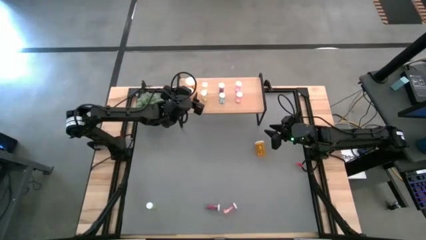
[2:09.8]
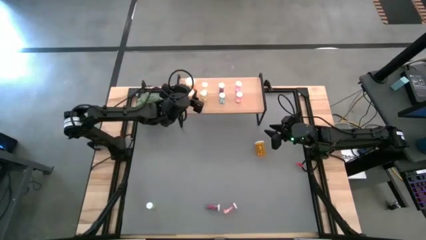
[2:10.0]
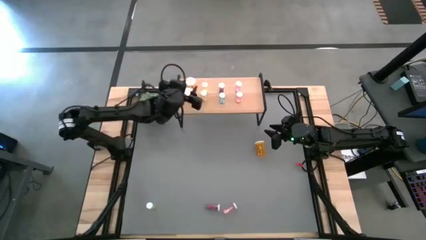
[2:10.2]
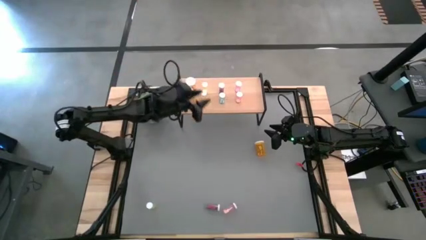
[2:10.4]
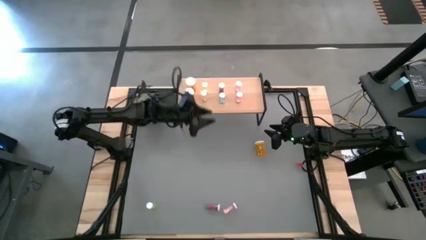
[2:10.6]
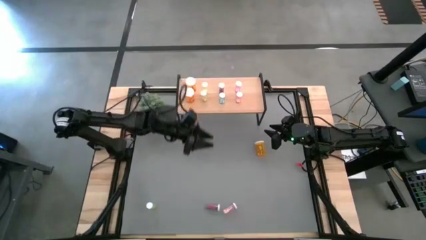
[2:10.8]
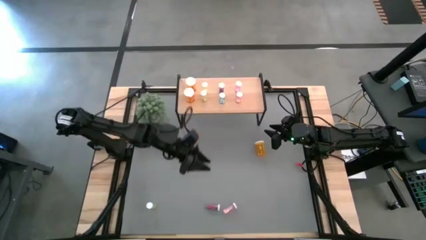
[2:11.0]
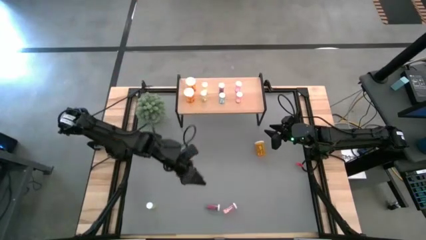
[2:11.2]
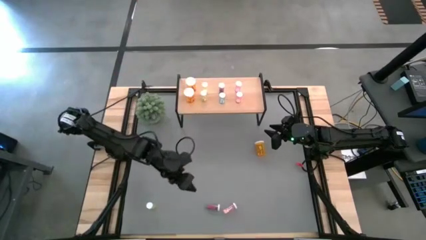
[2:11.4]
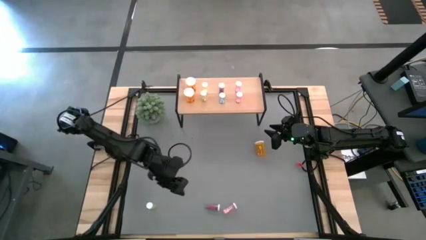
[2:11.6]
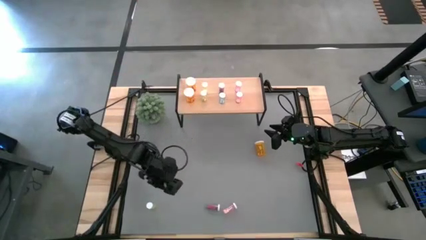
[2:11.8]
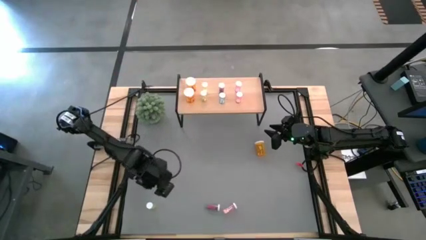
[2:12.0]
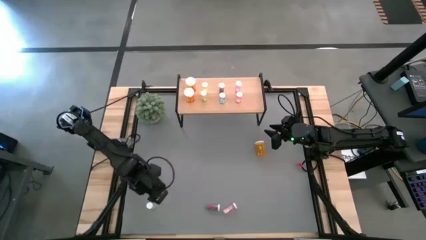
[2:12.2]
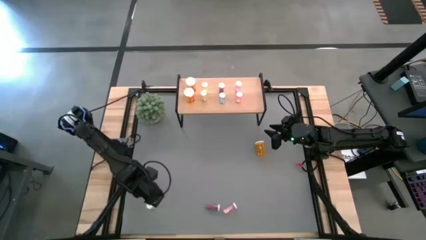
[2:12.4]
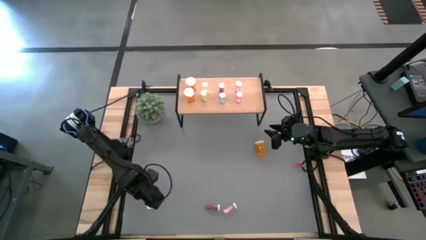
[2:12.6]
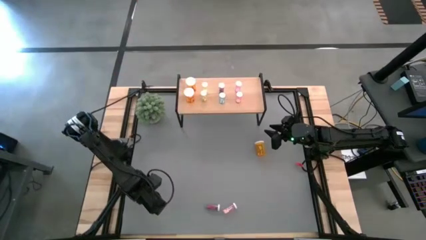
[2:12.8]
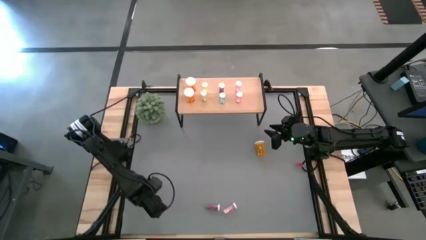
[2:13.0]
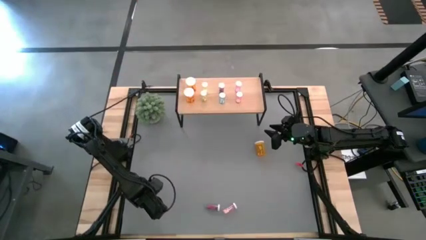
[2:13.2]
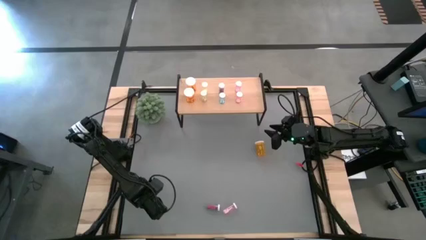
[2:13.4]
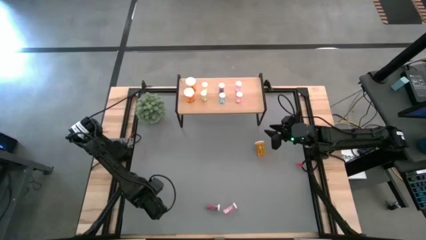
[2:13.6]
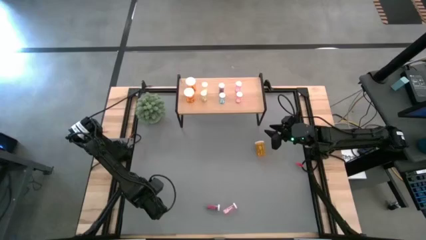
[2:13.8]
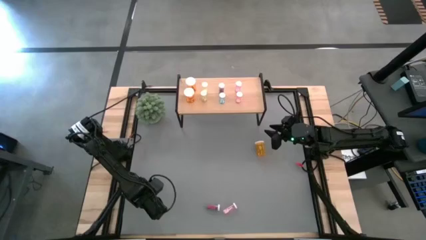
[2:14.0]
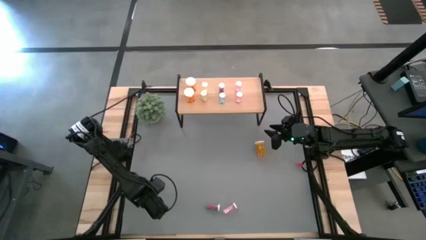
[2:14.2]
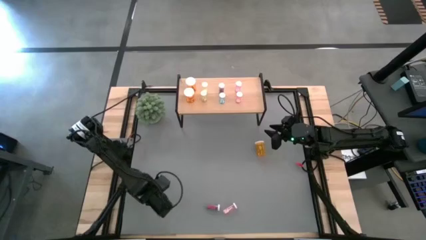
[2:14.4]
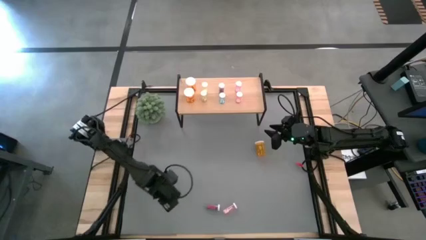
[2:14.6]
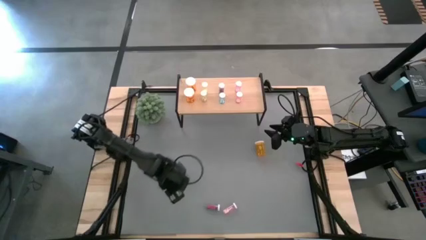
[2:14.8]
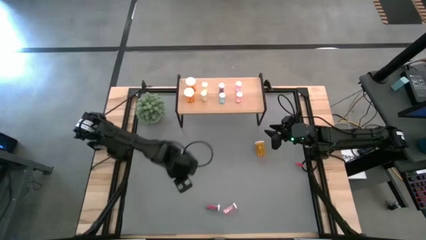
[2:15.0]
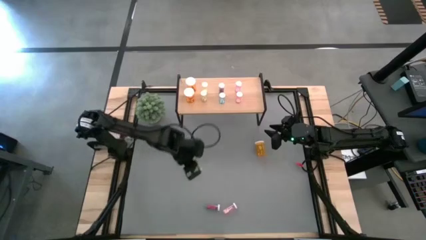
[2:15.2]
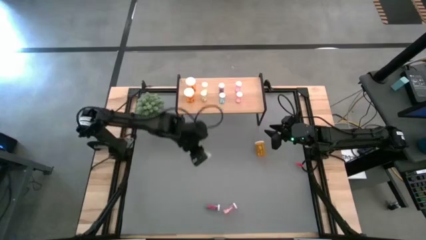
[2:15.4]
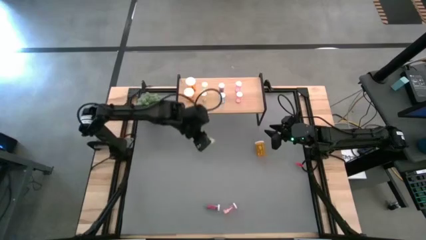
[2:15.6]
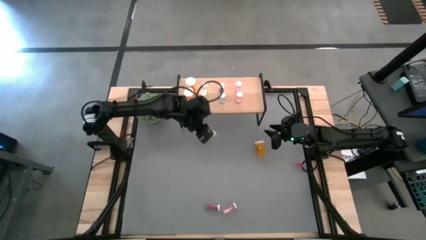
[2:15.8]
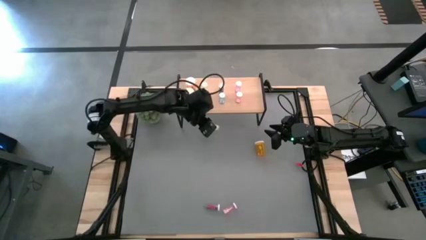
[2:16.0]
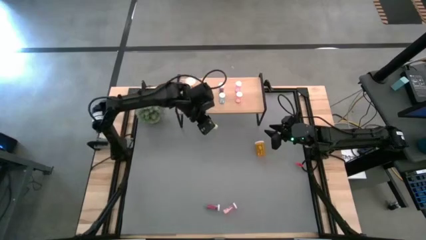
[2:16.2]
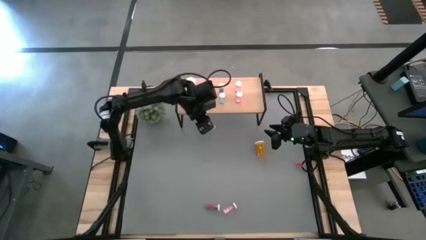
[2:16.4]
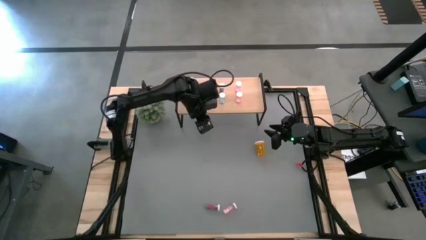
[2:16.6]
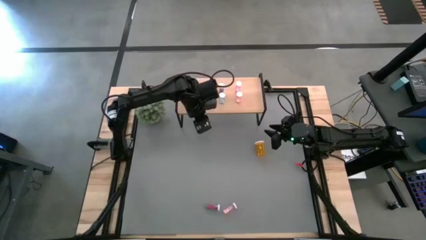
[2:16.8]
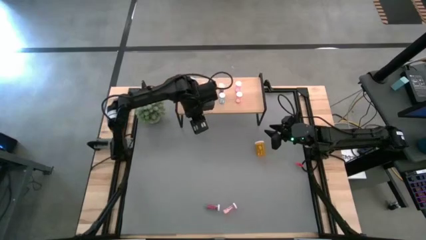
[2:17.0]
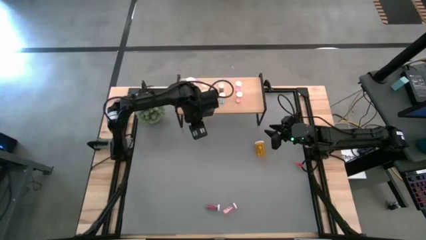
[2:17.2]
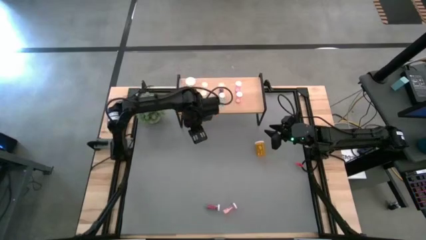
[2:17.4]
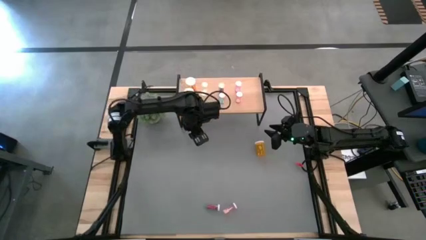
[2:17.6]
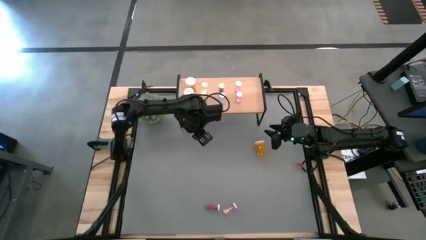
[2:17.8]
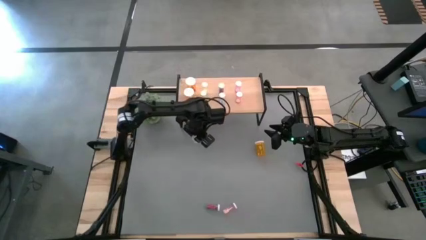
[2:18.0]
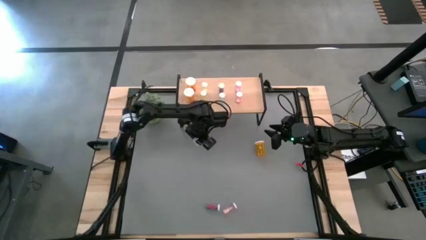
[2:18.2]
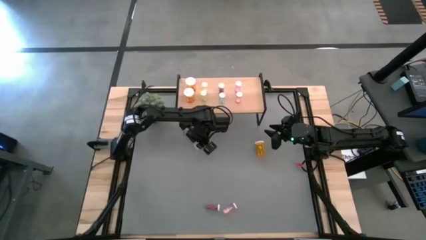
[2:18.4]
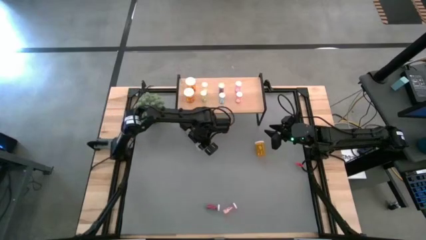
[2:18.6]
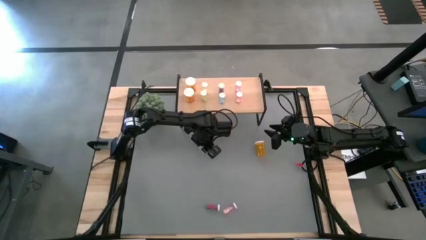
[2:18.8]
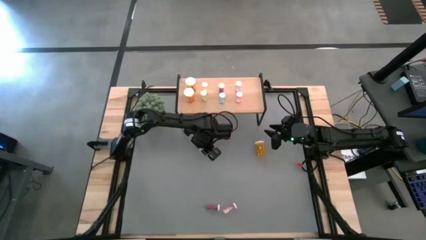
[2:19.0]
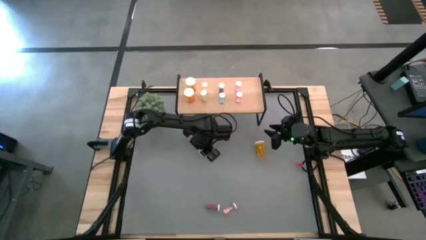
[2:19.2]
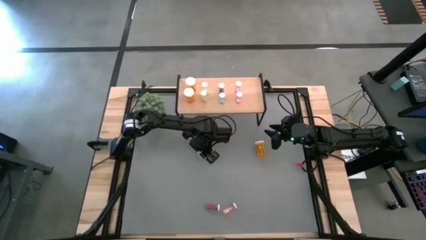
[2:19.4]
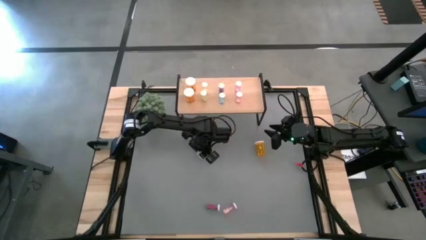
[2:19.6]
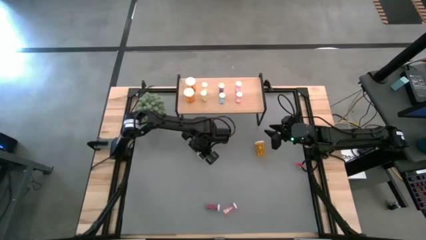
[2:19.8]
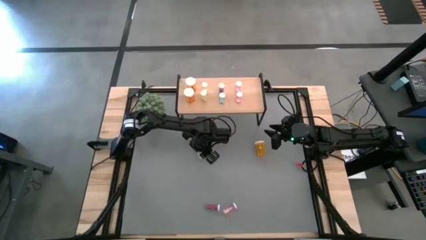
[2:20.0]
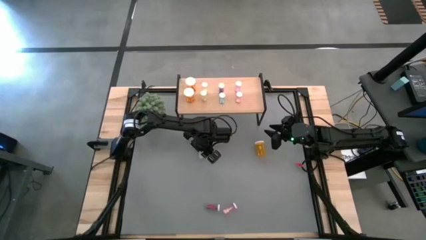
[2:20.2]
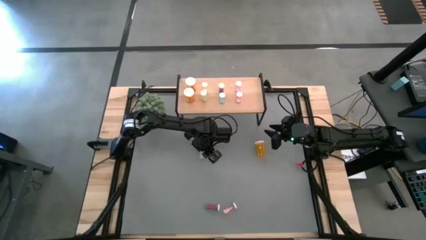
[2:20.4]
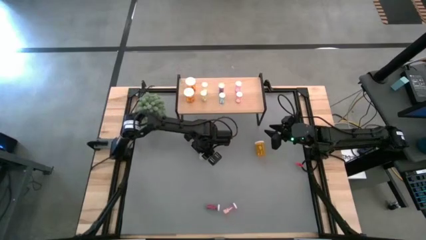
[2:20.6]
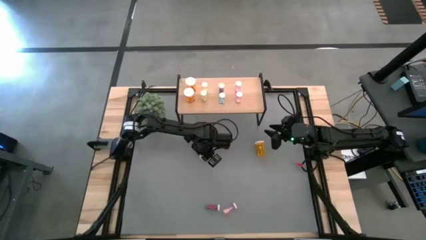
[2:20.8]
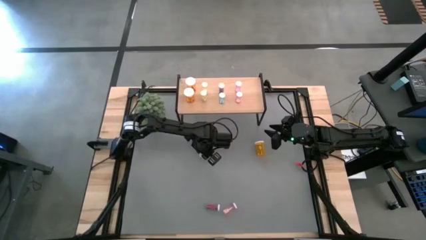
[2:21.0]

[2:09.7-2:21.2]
Task: Pick and place medicine bottles onto shelf by color
Put the yellow pill bottle on the shelf aligned with the other yellow pill bottles
